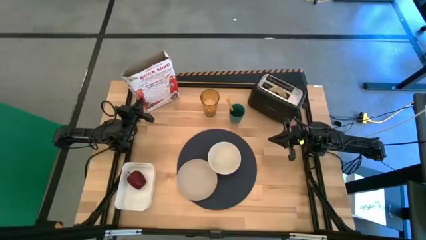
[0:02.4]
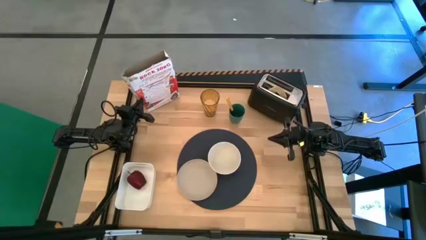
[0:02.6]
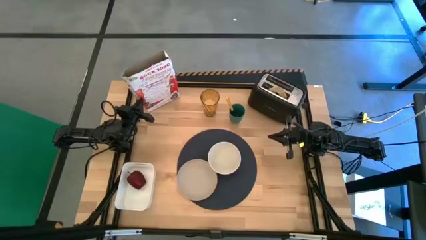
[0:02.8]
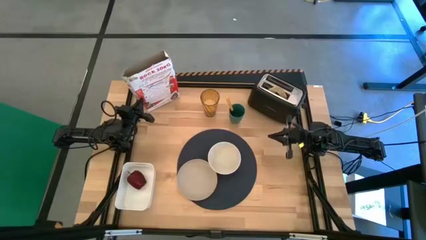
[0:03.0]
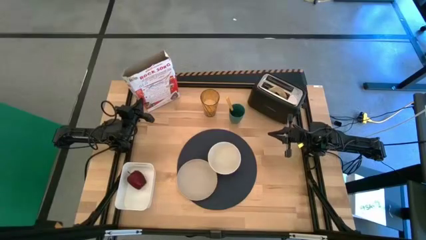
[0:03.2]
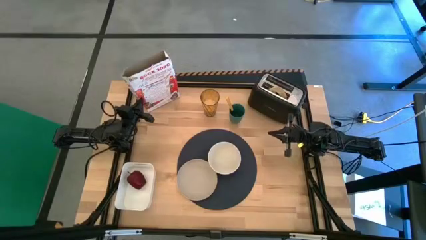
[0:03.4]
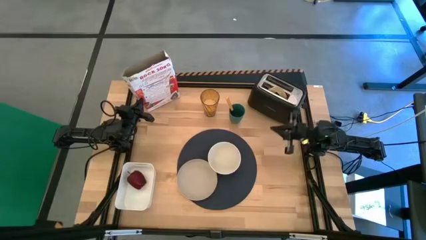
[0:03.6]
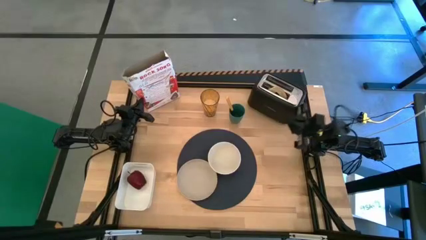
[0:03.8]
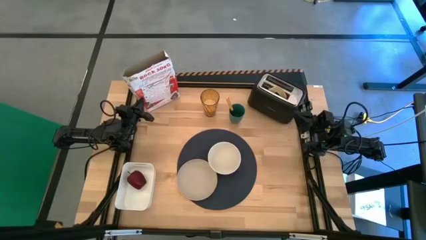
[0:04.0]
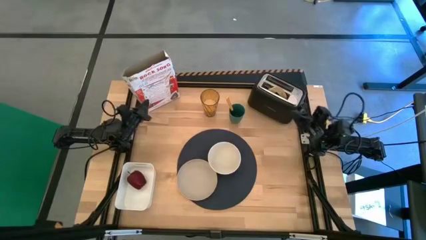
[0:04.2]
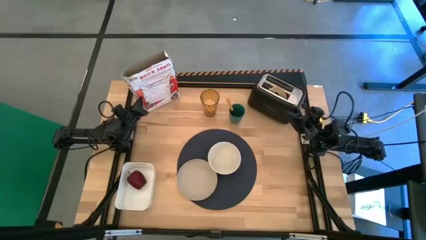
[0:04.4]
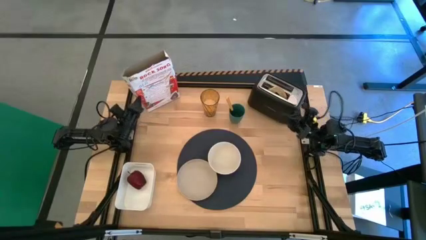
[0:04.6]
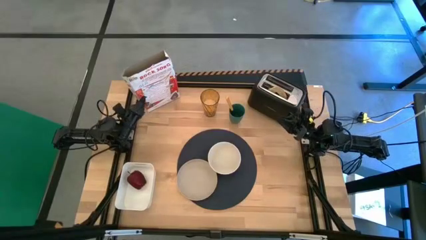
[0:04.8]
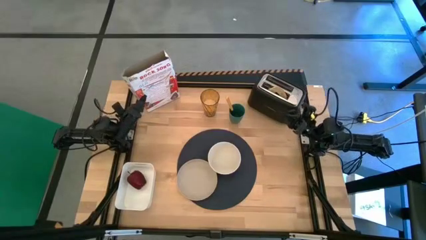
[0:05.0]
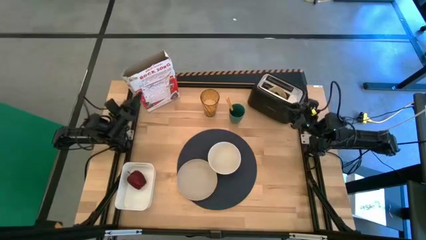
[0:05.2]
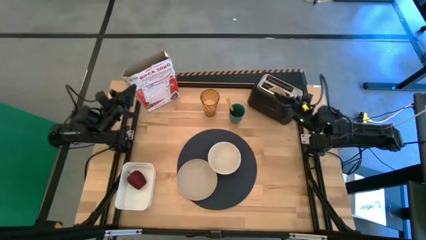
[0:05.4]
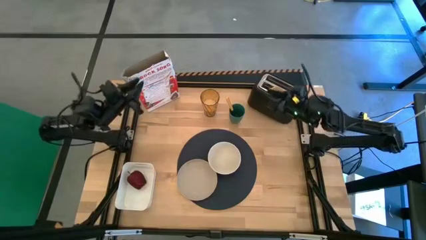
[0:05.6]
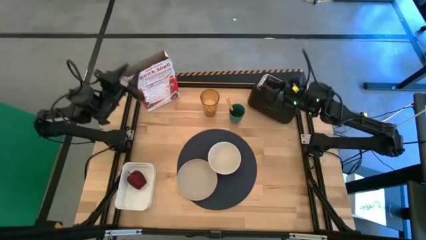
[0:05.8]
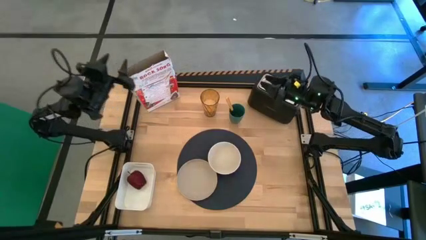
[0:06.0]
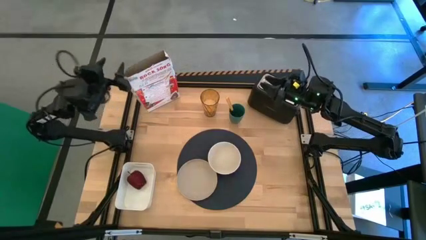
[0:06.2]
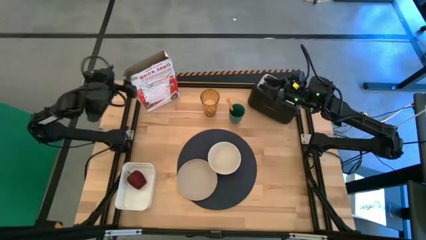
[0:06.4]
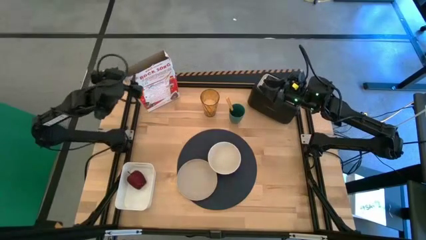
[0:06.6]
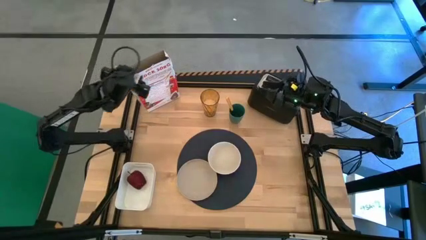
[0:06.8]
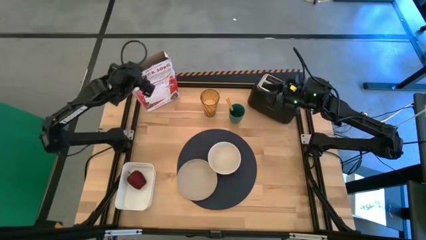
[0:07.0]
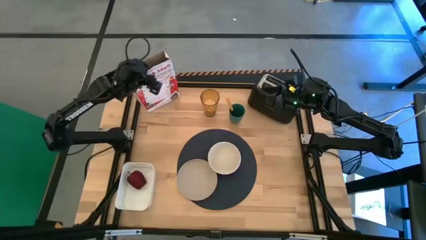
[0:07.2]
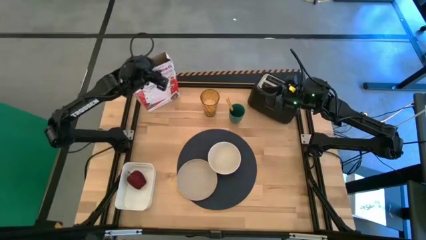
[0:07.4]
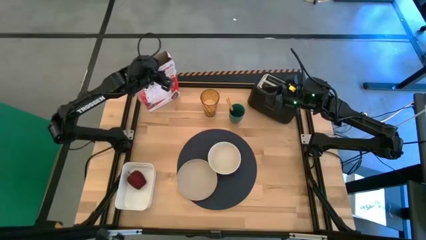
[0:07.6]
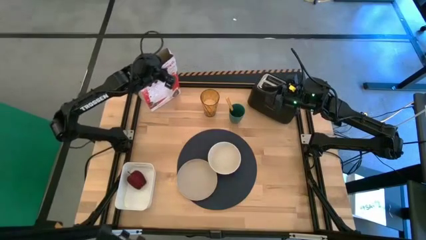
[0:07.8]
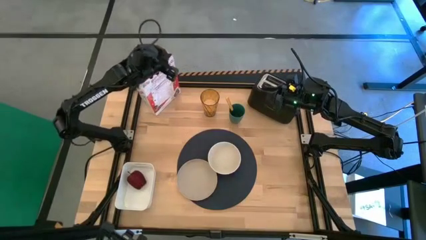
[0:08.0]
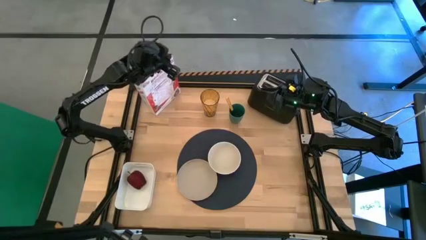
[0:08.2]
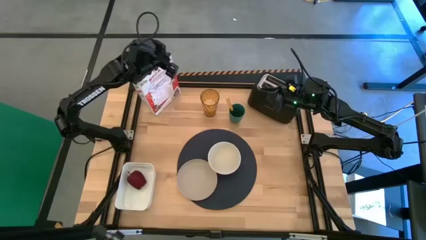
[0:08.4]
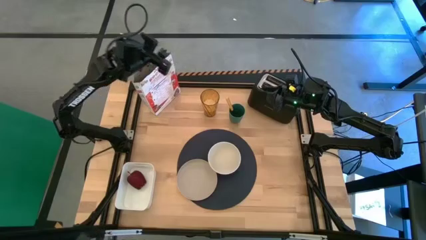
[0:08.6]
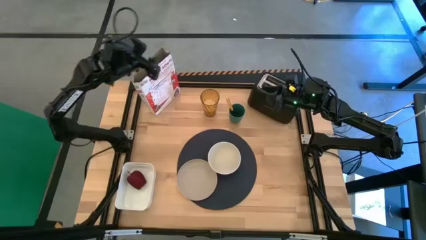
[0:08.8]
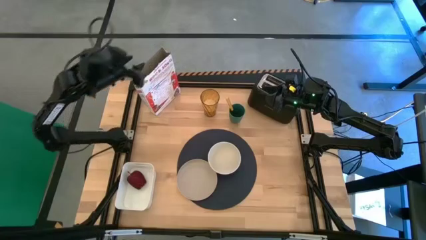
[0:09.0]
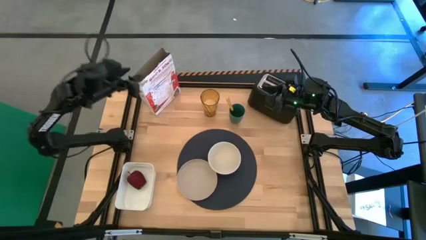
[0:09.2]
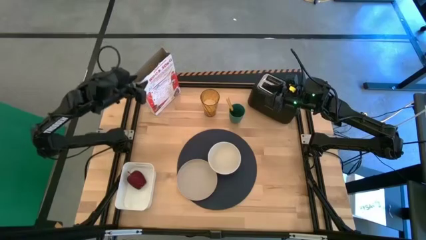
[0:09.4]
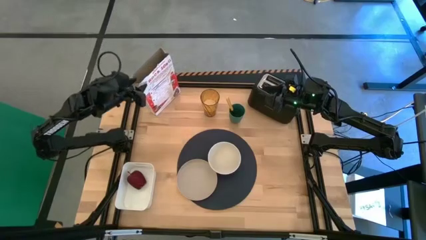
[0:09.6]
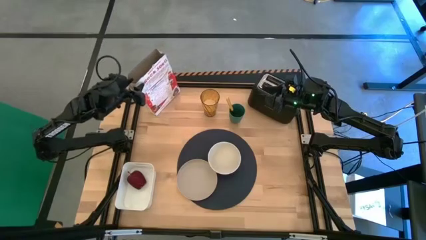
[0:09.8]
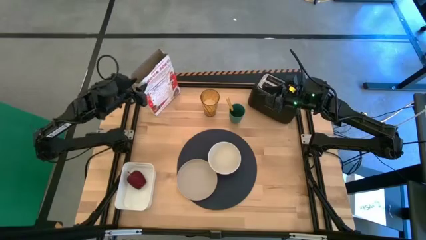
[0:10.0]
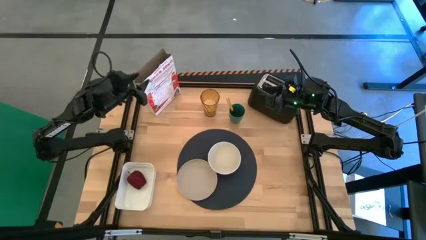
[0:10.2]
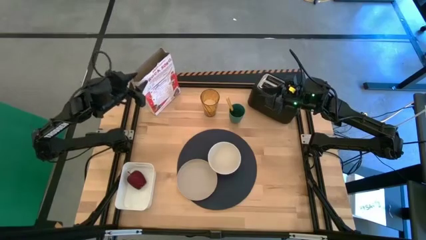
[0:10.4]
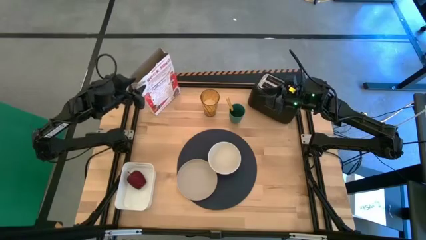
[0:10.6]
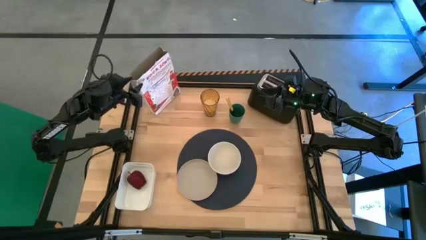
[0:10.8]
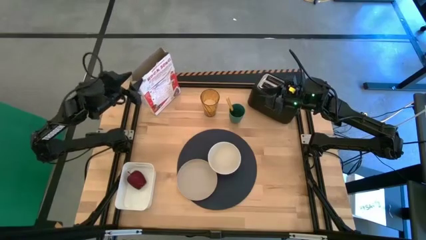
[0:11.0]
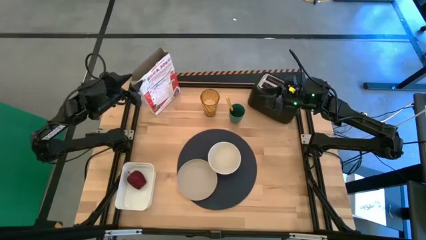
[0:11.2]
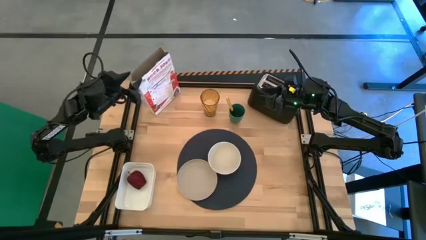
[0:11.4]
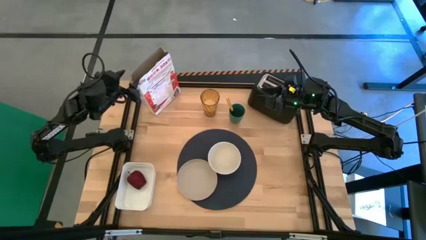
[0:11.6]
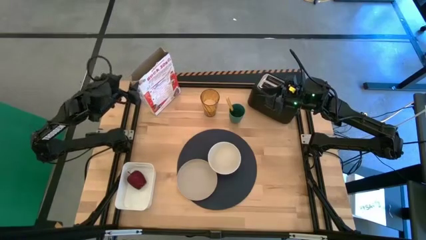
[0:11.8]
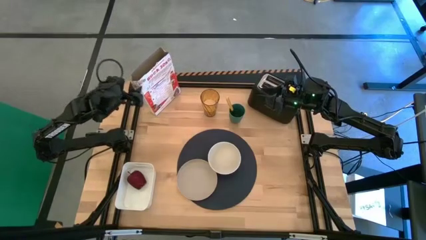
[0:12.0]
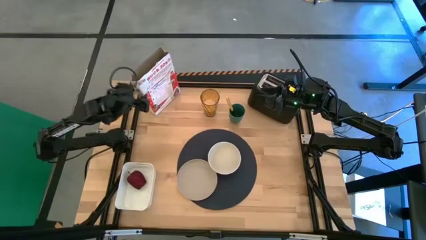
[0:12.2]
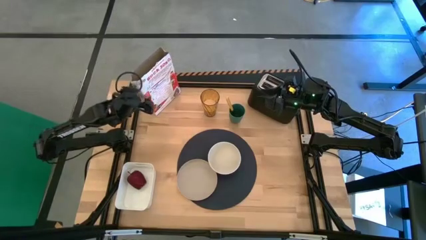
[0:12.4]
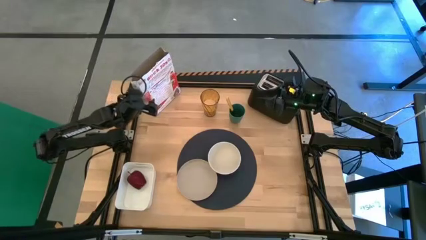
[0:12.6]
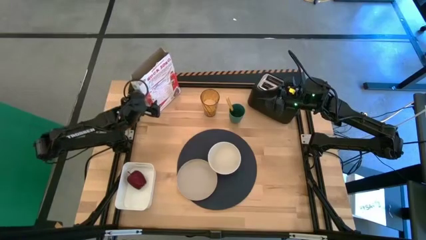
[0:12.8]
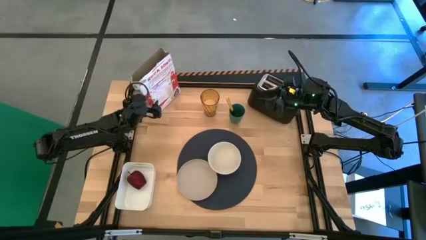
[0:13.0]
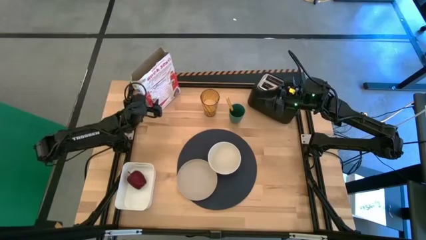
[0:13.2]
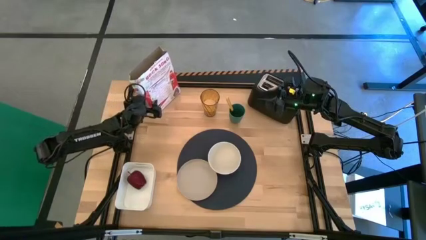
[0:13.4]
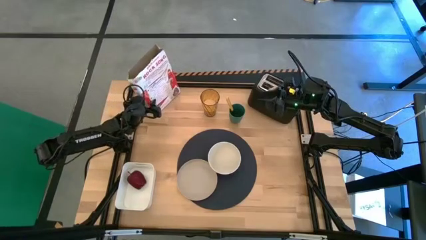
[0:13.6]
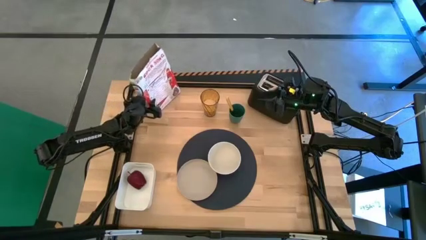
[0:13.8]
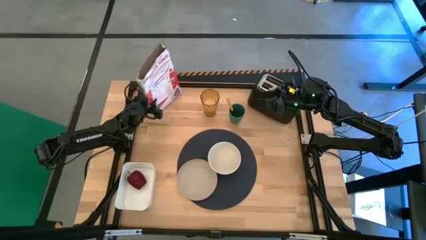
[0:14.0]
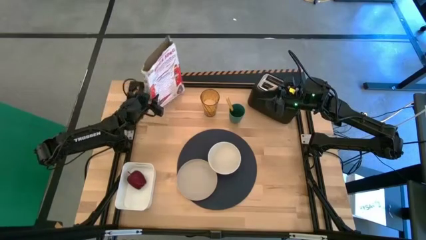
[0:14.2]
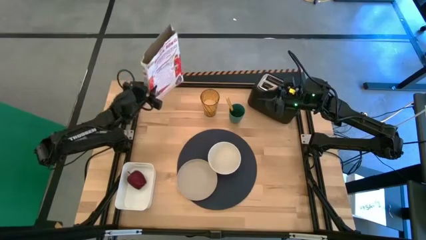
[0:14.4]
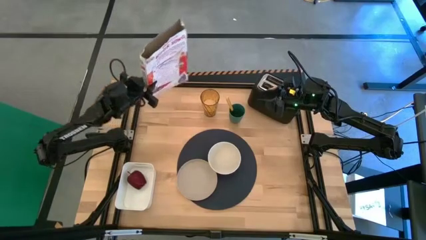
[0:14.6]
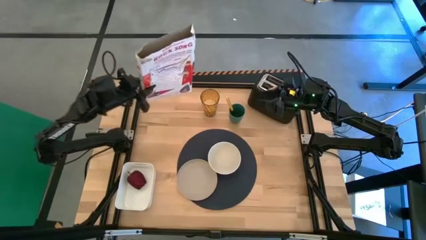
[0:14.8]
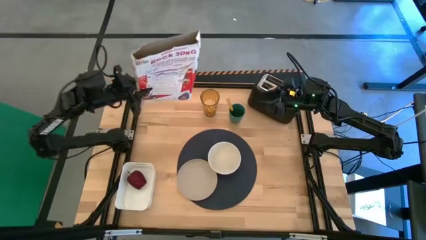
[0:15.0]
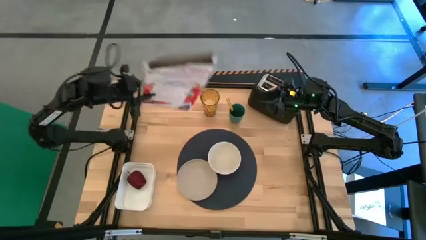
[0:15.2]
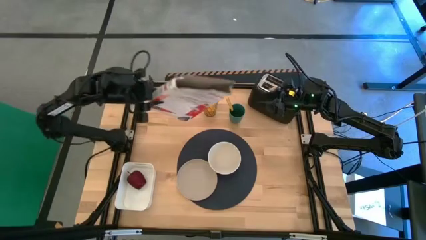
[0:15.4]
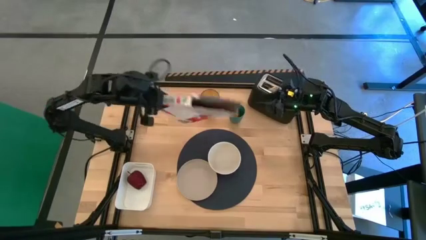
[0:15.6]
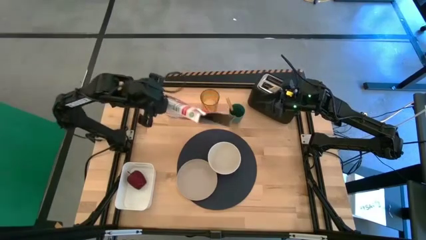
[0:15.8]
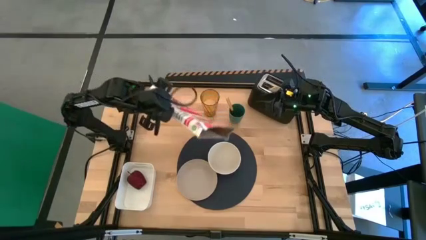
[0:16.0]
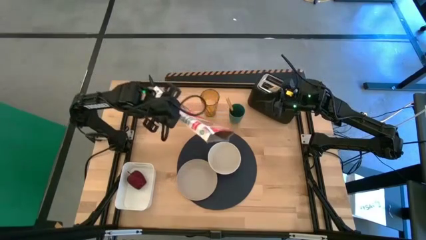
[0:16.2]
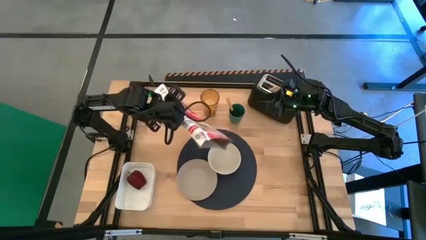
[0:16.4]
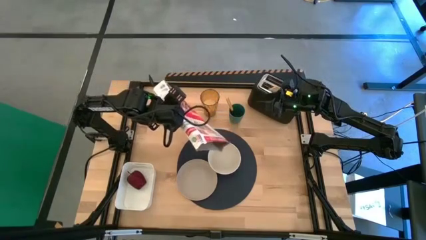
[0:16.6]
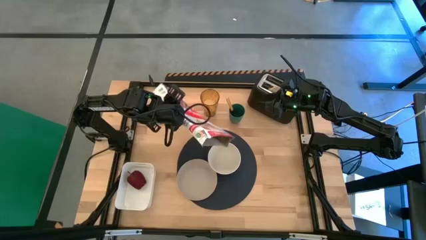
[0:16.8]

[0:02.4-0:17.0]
Task: Arrange a breakfast setting
Pour the cereal from the cereal box into the white bowl
